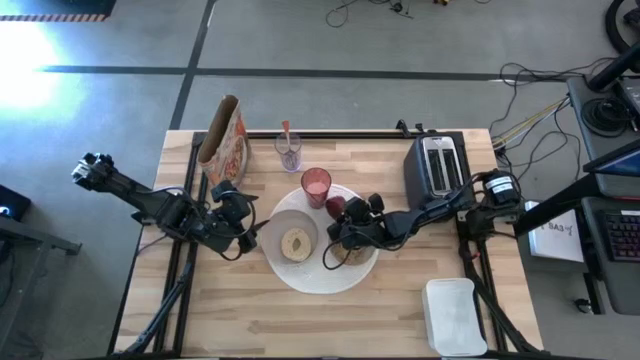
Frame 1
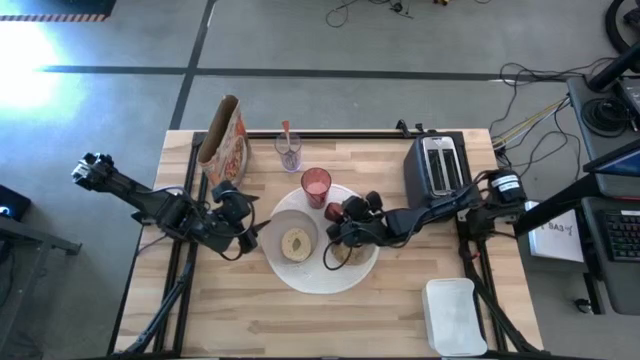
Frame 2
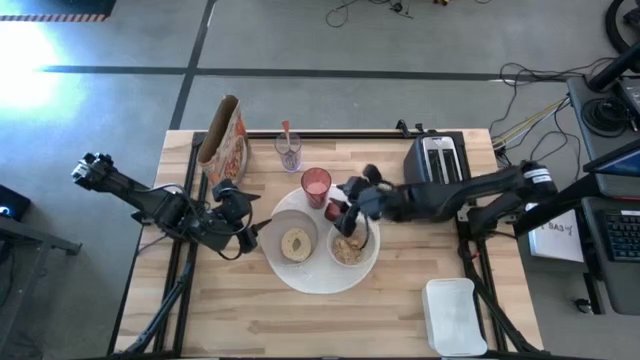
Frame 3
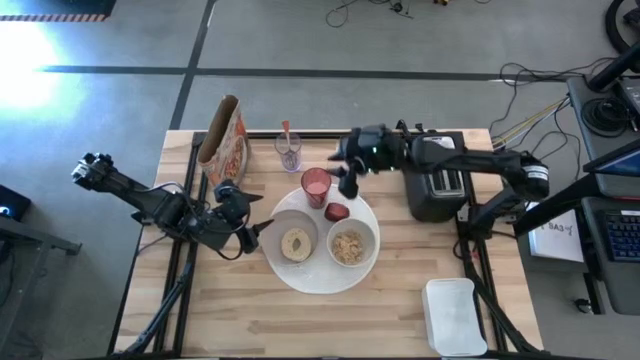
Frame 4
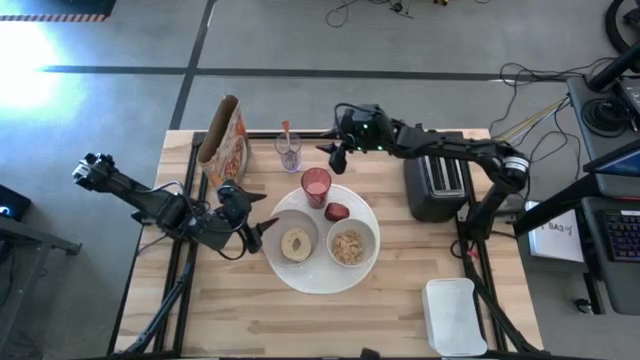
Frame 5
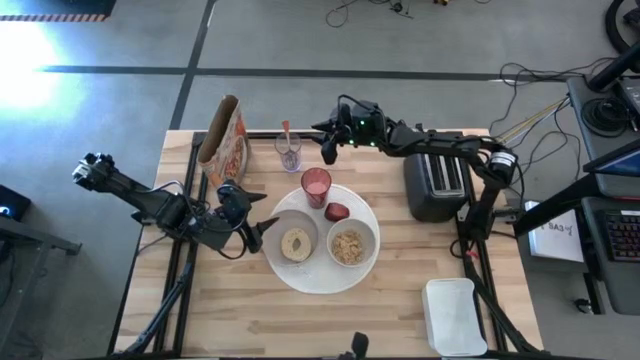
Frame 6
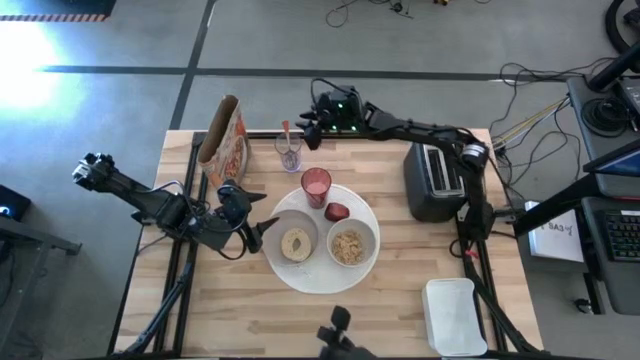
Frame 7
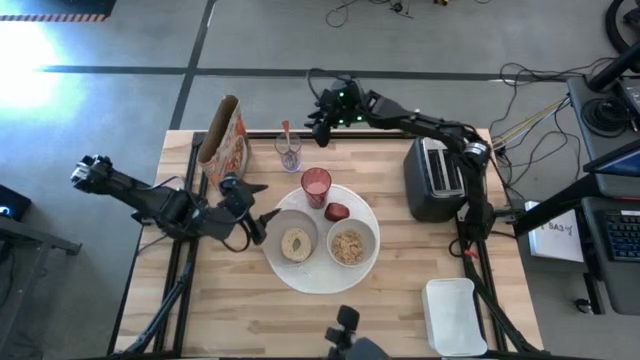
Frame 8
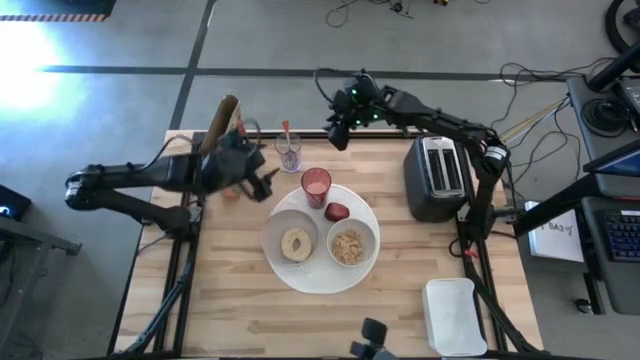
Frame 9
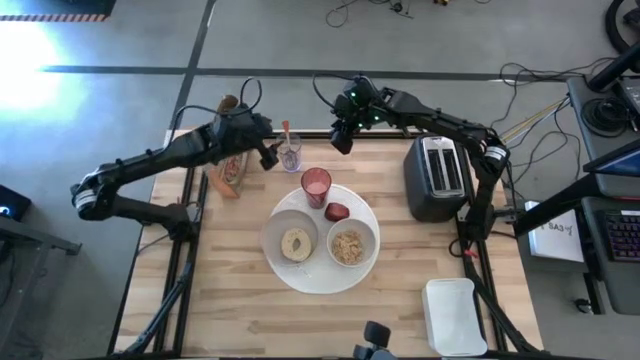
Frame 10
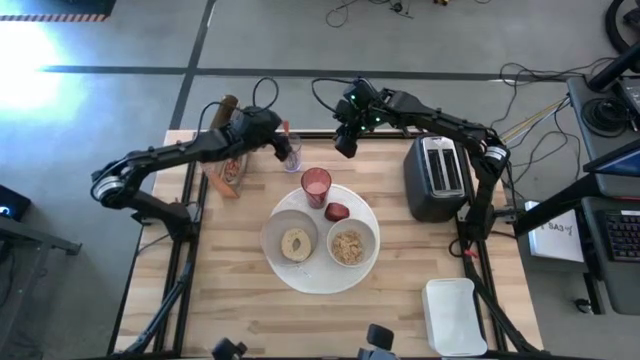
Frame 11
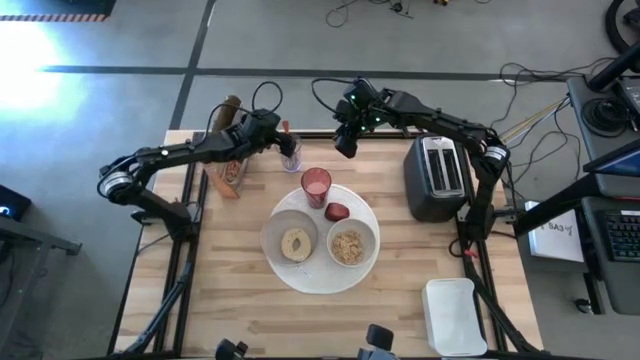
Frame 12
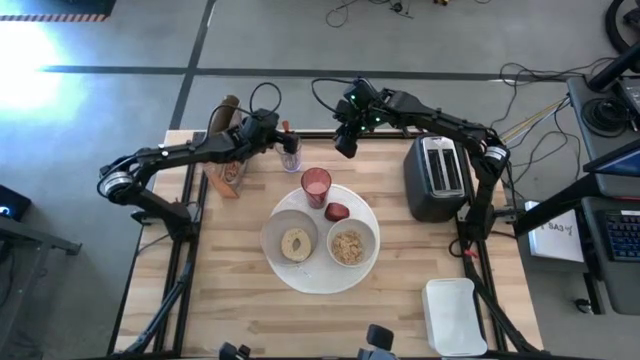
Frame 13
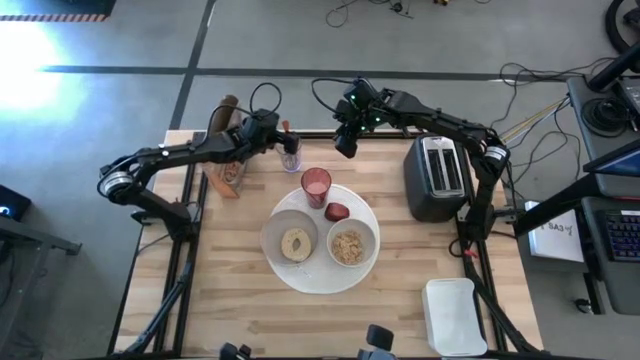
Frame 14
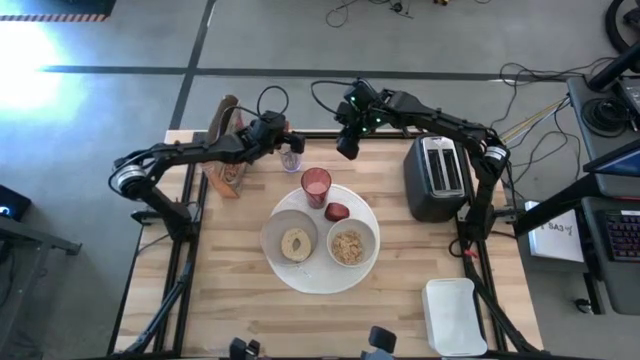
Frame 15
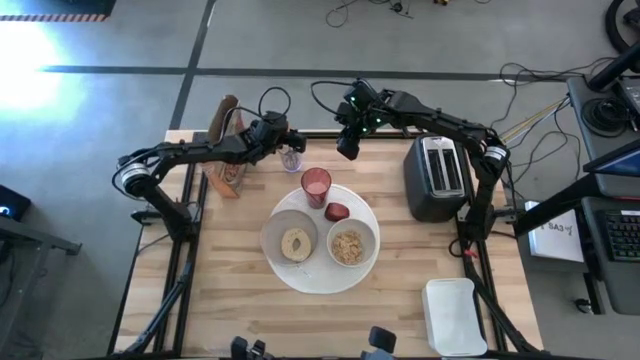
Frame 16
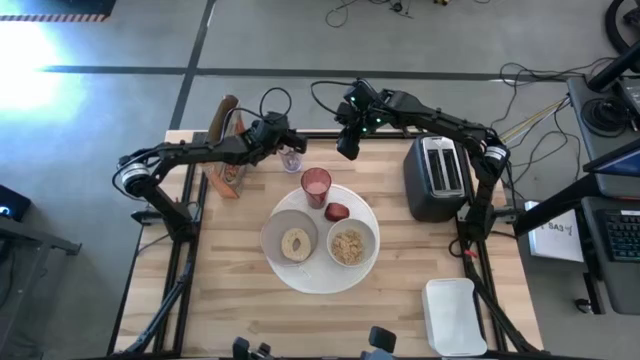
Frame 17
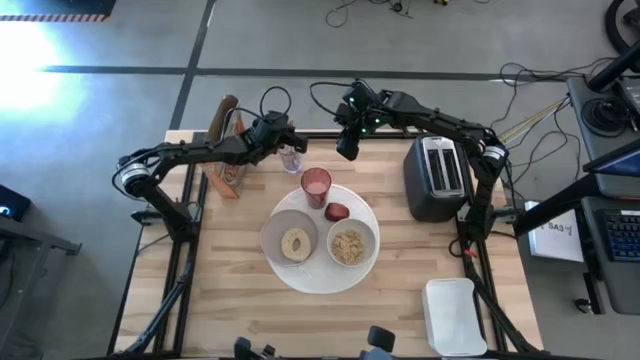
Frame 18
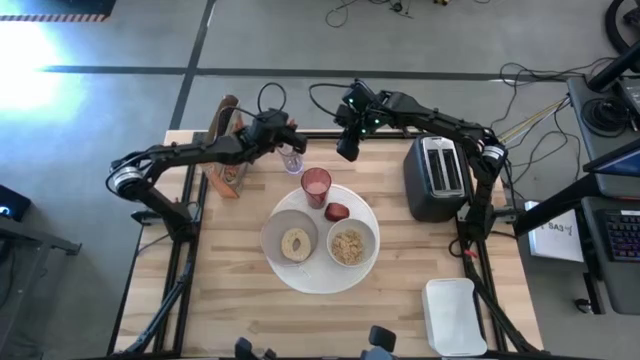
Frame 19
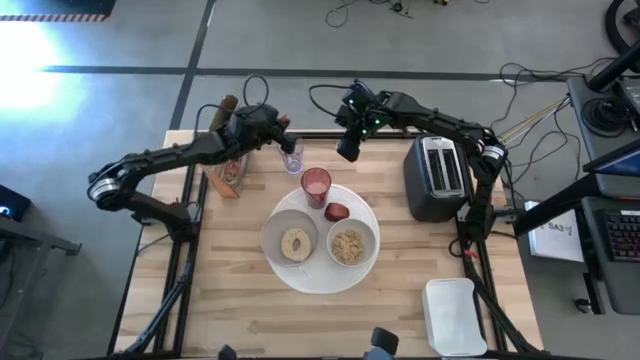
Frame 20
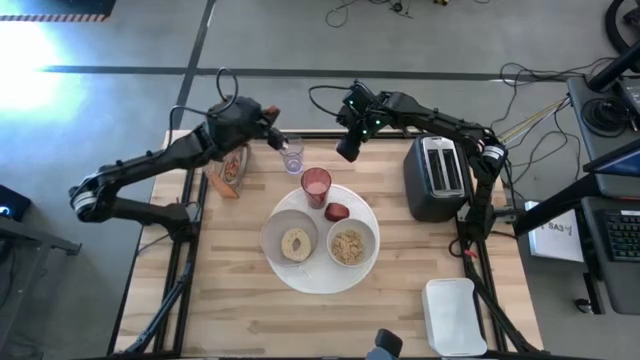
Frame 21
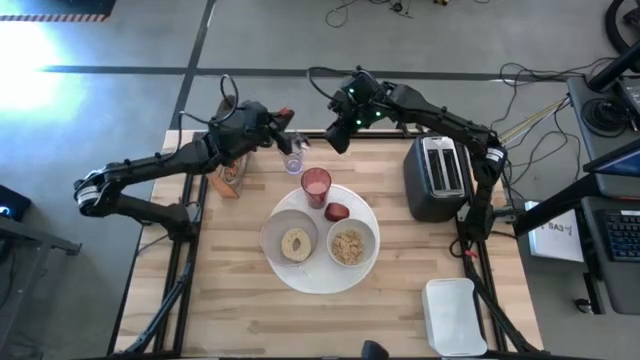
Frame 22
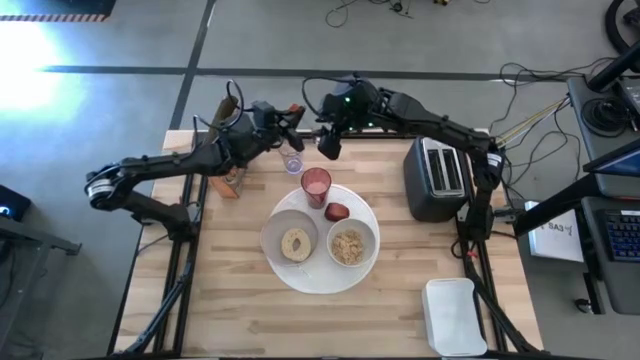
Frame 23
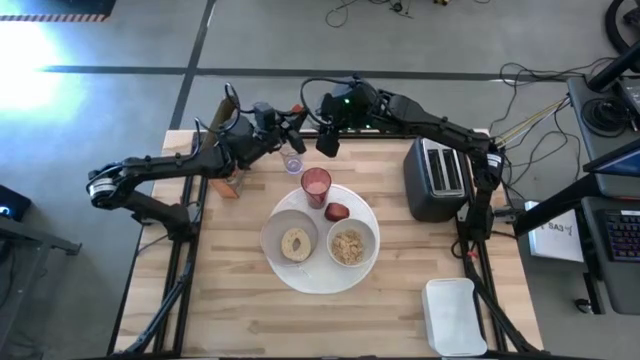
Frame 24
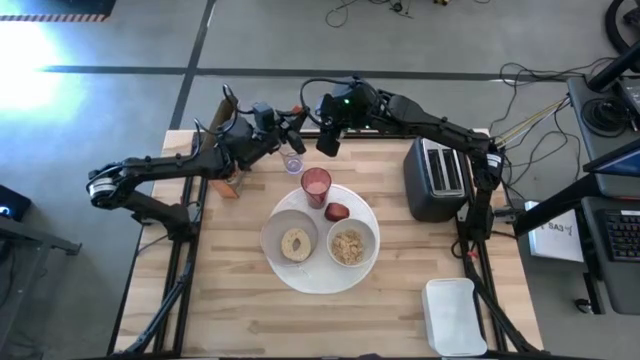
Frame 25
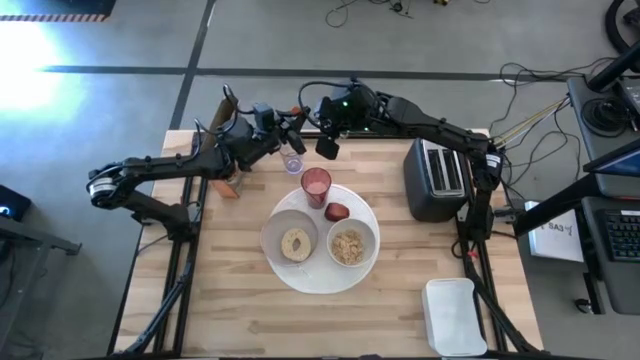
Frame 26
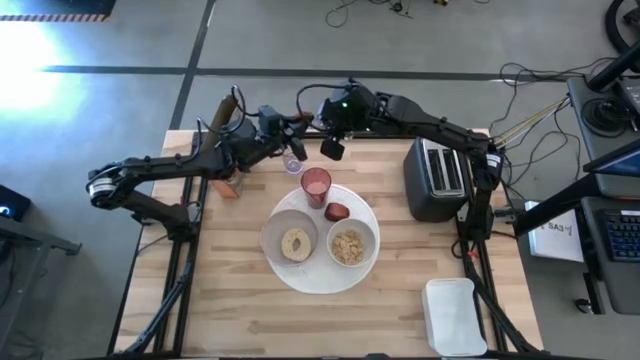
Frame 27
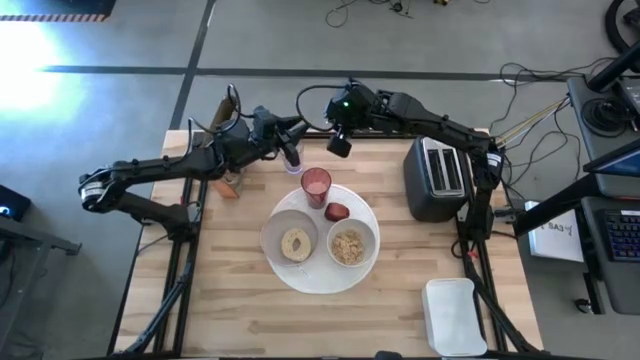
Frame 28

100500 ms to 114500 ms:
Task: Arrange a breakfast setting
Put the orange spoon on the white table mat to the right of the white bowl

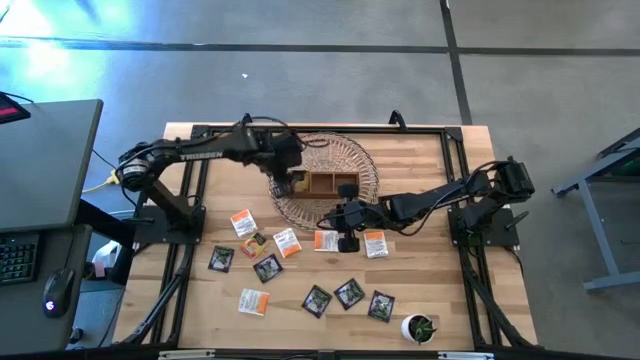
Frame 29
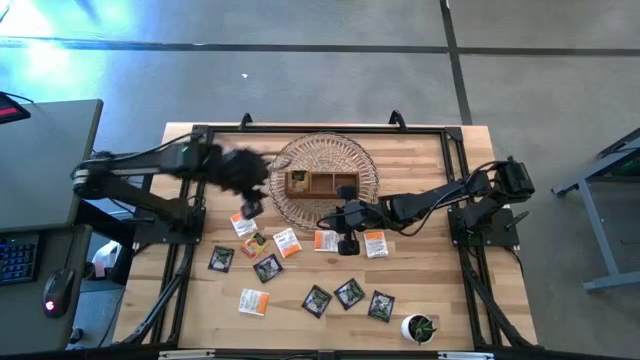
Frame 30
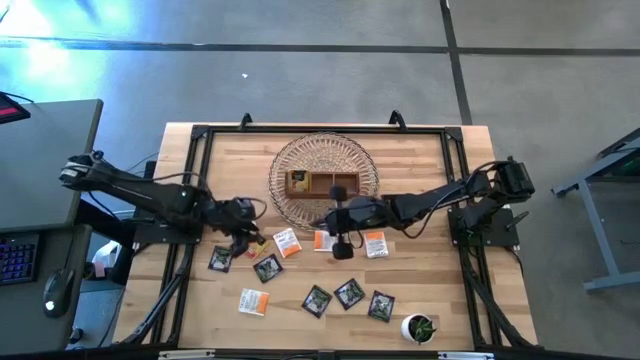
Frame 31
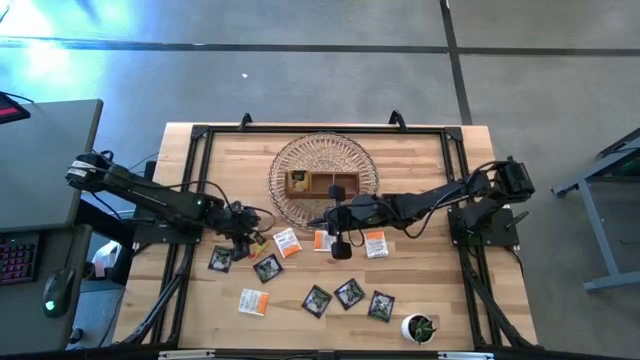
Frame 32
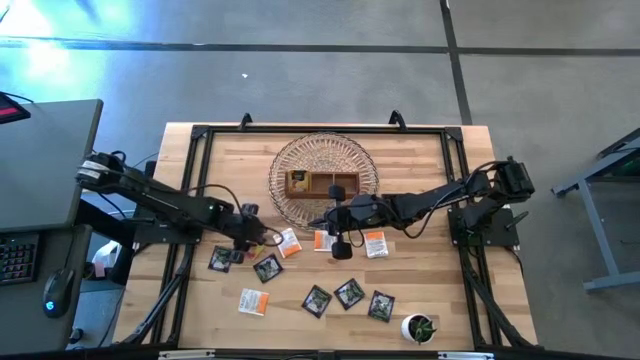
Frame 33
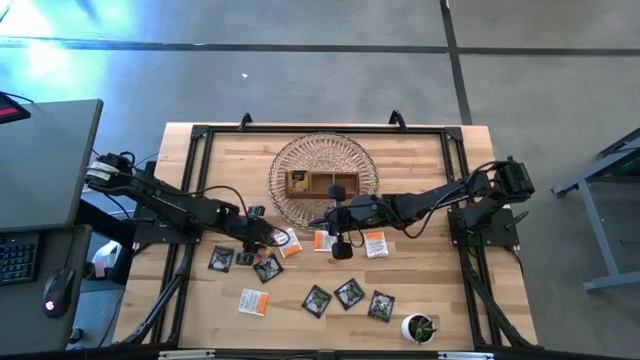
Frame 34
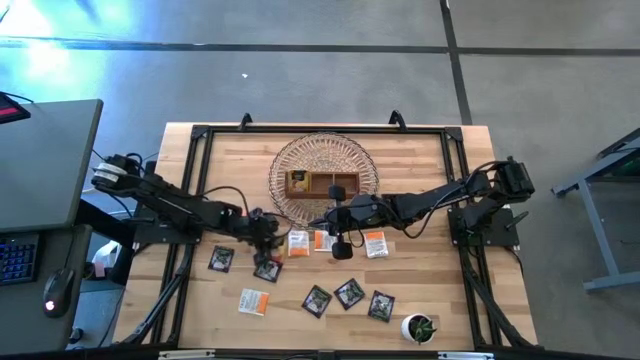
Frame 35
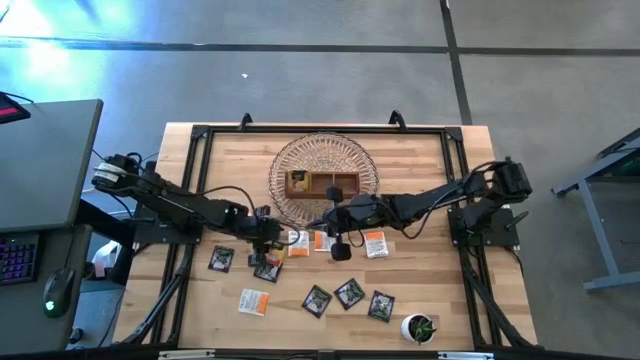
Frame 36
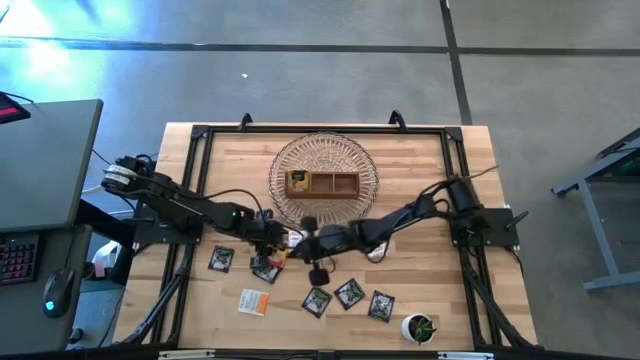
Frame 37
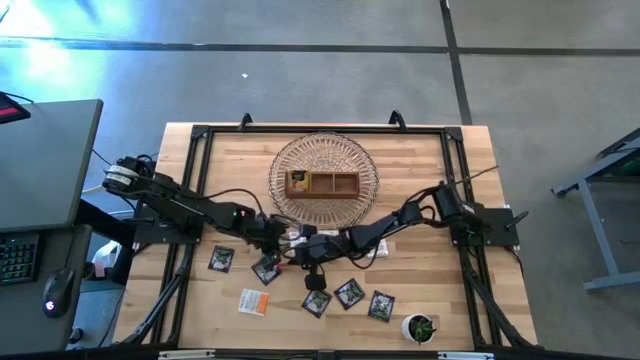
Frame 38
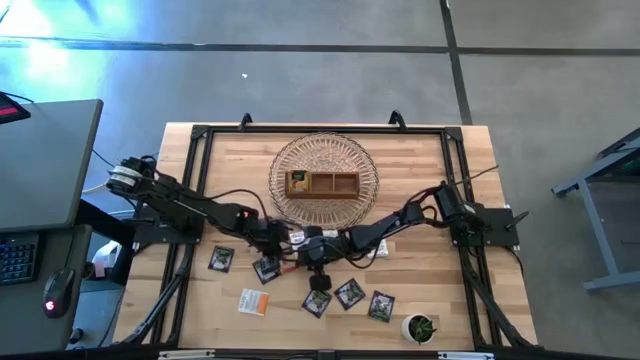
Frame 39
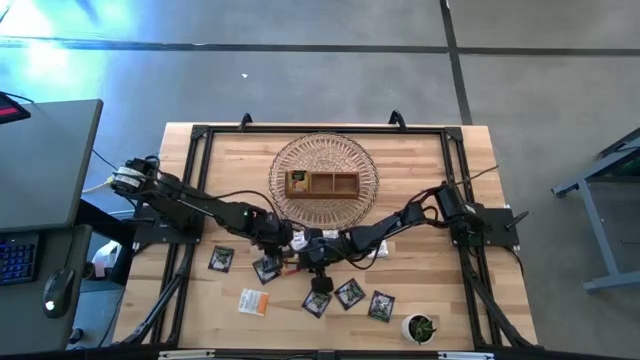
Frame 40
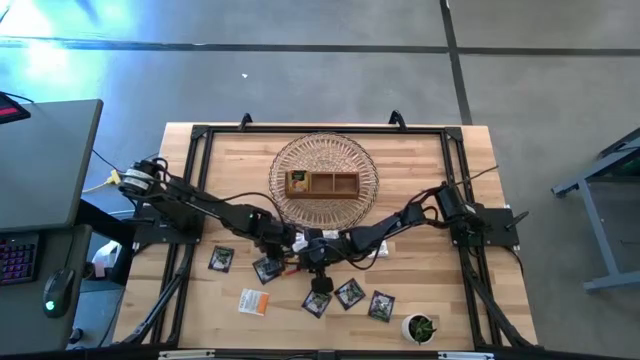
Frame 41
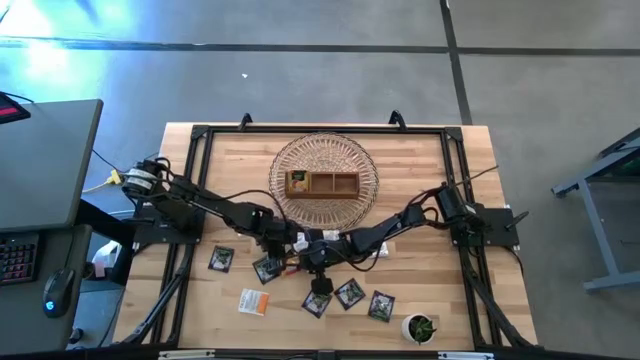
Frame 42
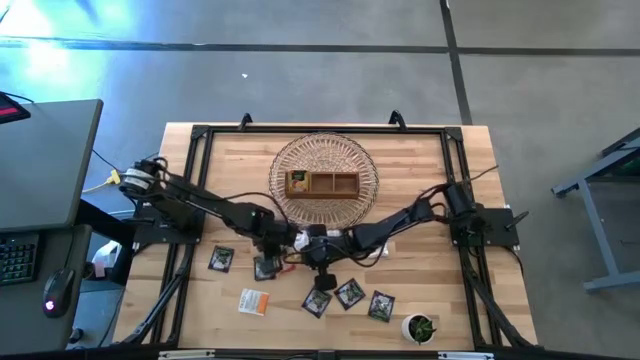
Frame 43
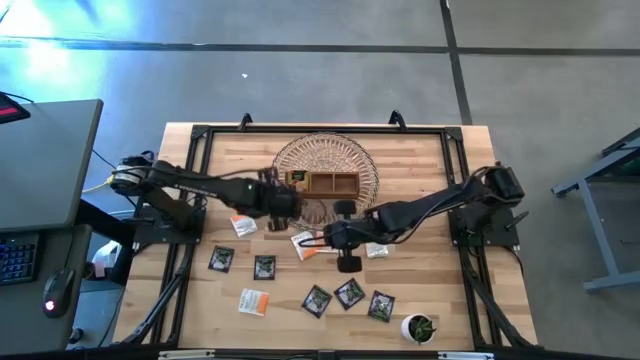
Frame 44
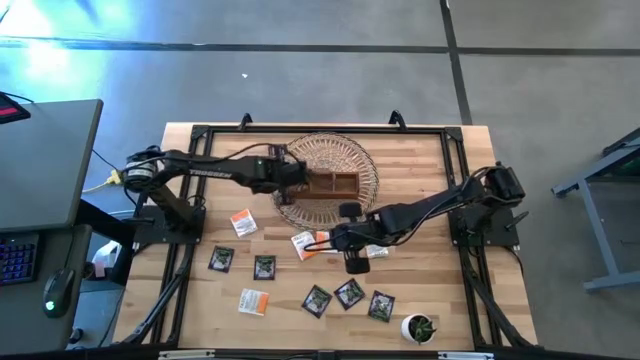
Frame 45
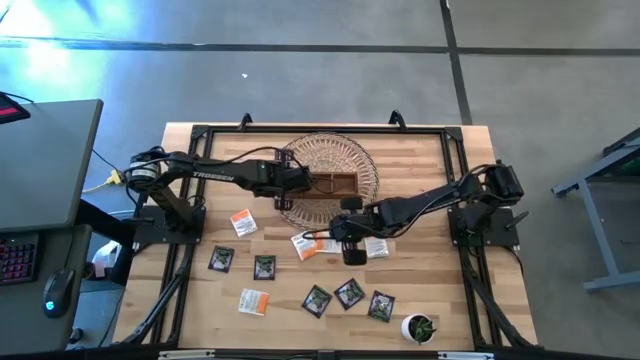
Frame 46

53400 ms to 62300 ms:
Task: Pick & Place Tea
Put the yellow tea bag into the left section of the wooden organizer
